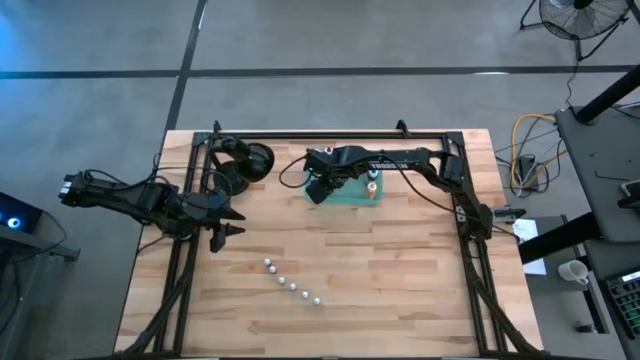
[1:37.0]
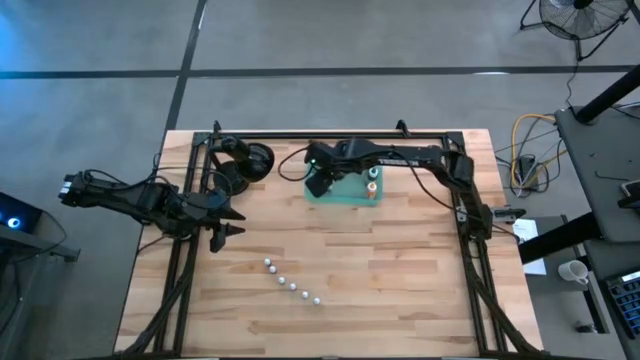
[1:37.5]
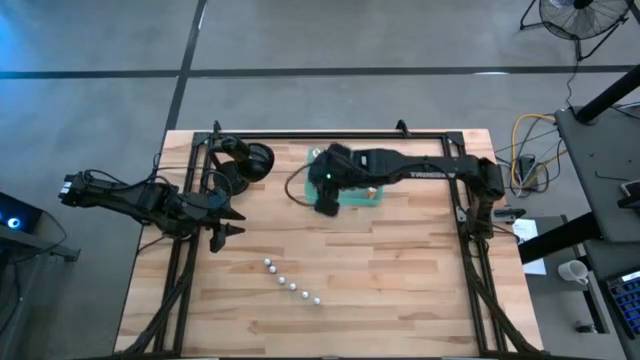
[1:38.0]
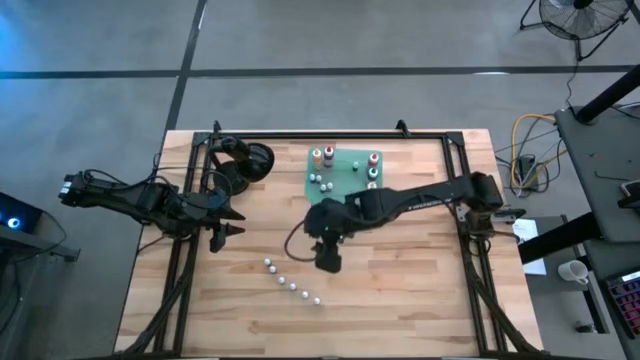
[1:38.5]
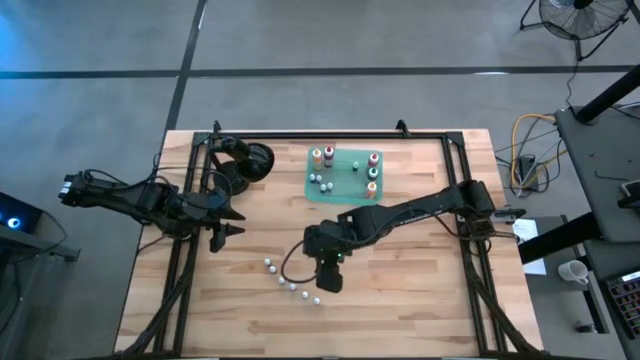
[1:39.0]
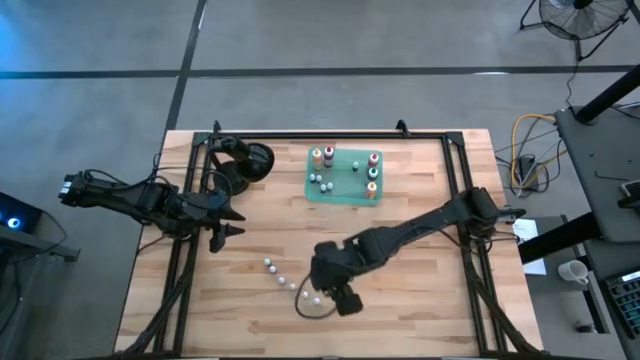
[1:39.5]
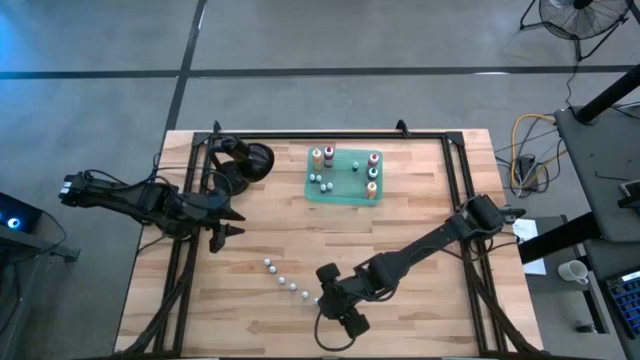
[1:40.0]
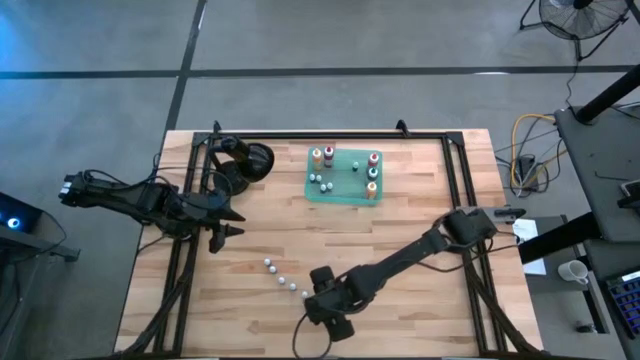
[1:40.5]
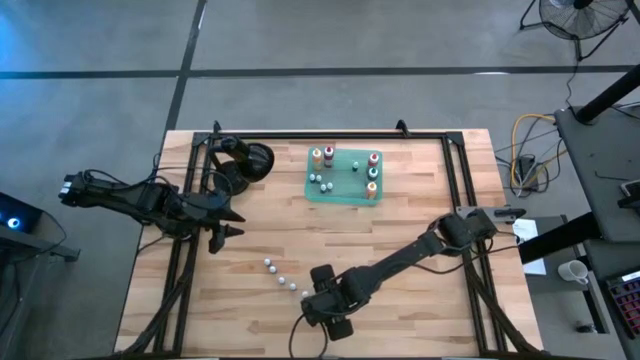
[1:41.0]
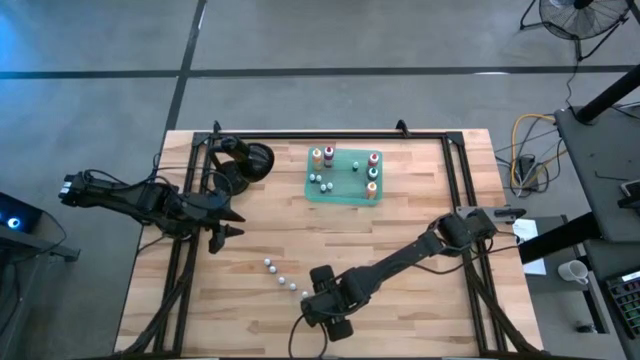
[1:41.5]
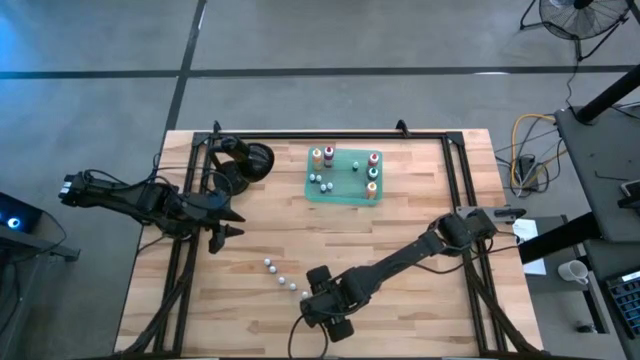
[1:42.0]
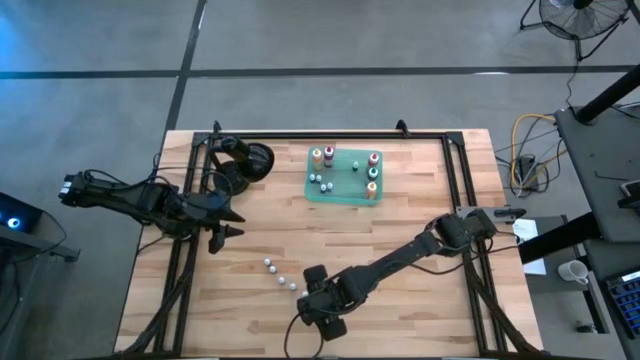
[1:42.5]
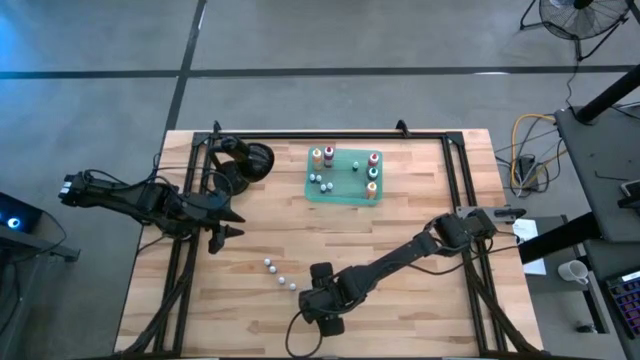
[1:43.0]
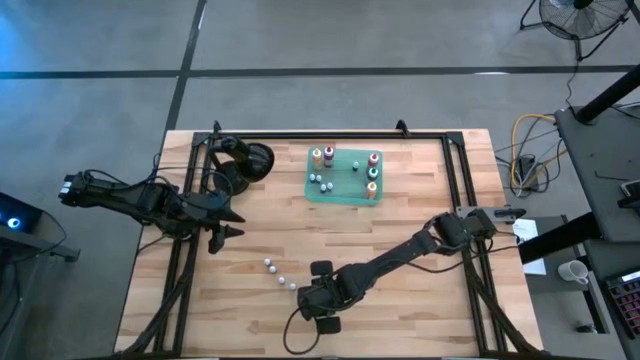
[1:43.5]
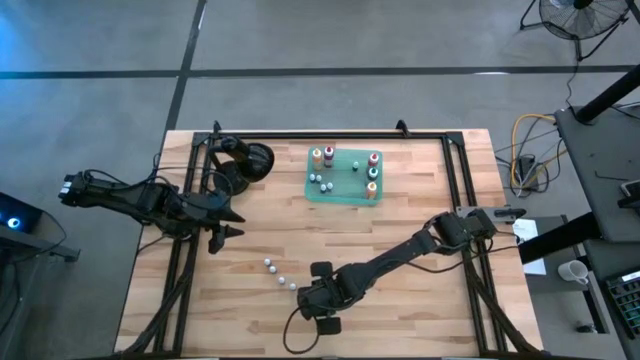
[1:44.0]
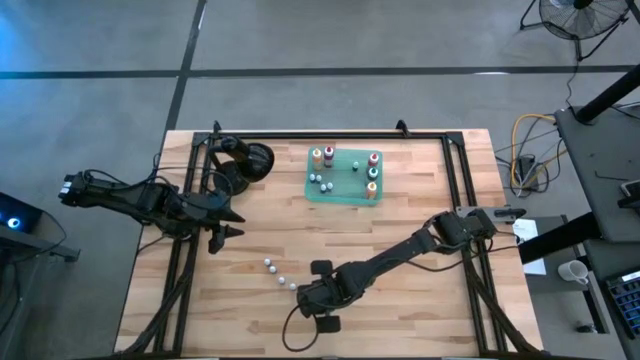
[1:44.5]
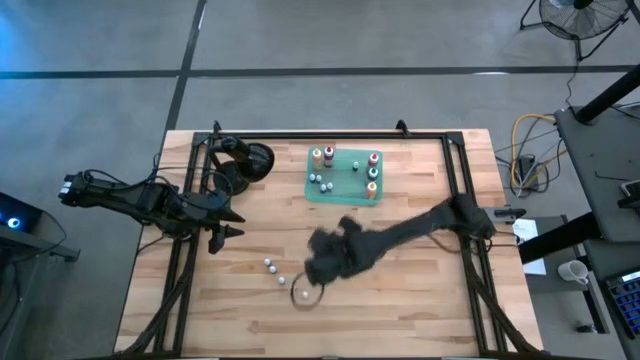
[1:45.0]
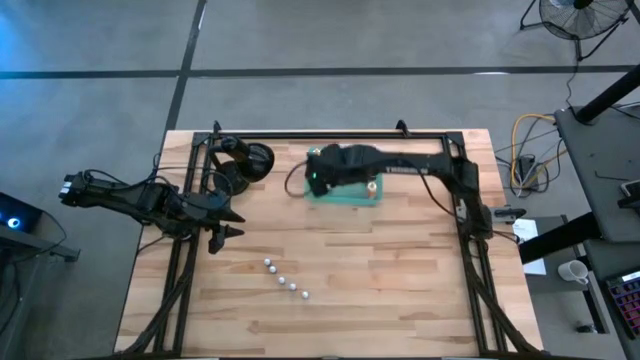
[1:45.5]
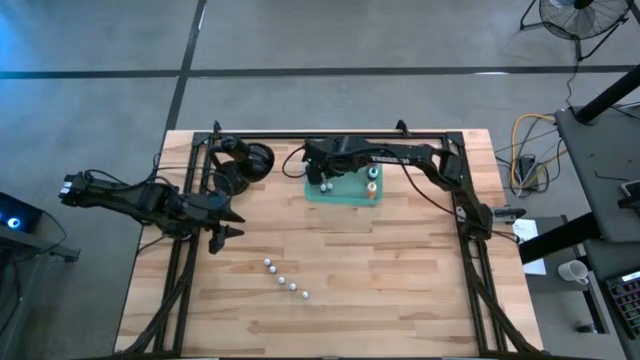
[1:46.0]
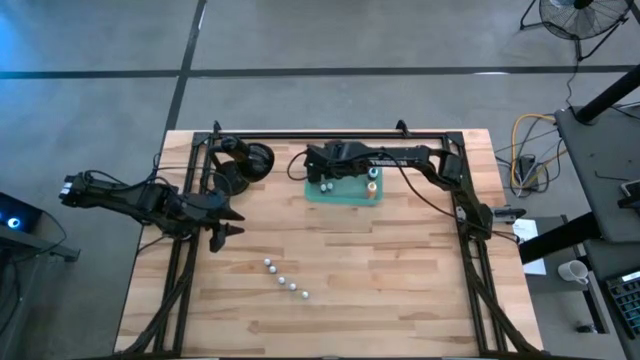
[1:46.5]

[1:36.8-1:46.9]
Task: Pick & Place food coloring
Put the small blue food coloring bottle into the green bin

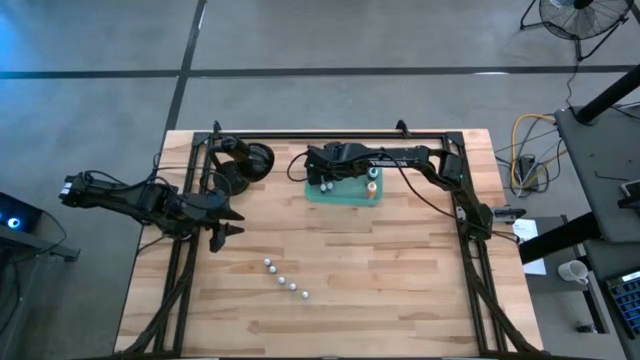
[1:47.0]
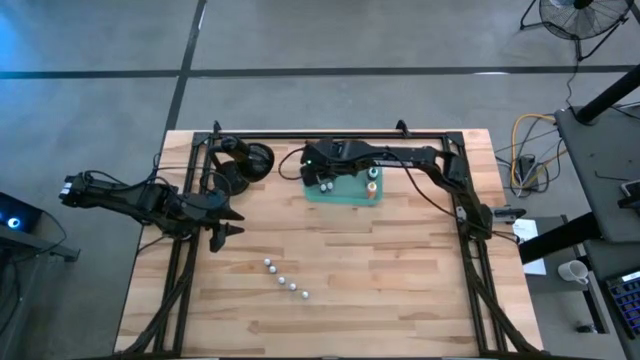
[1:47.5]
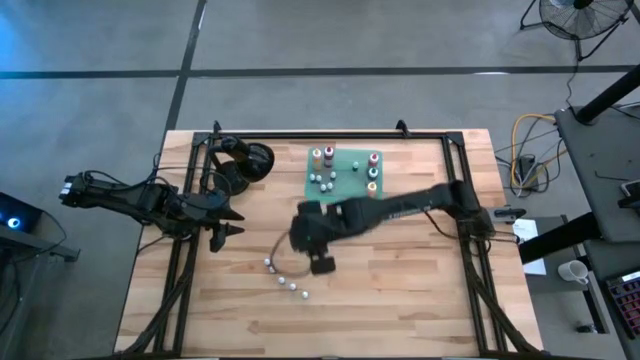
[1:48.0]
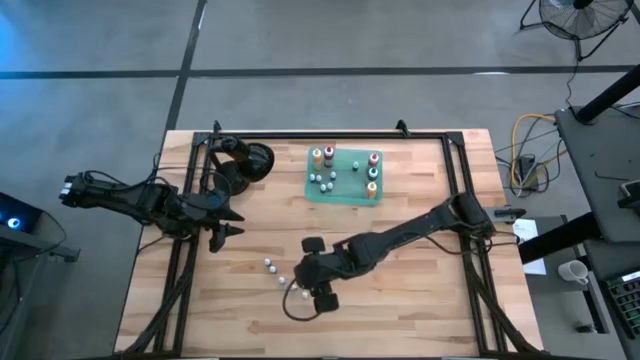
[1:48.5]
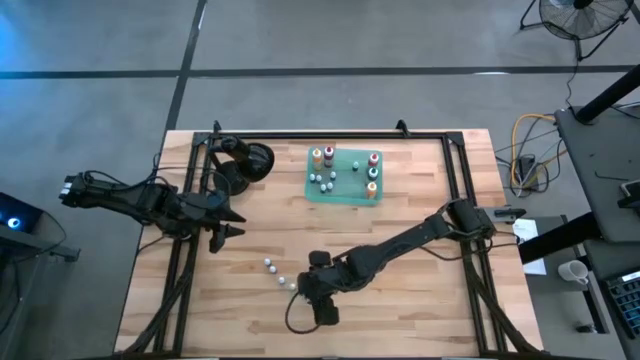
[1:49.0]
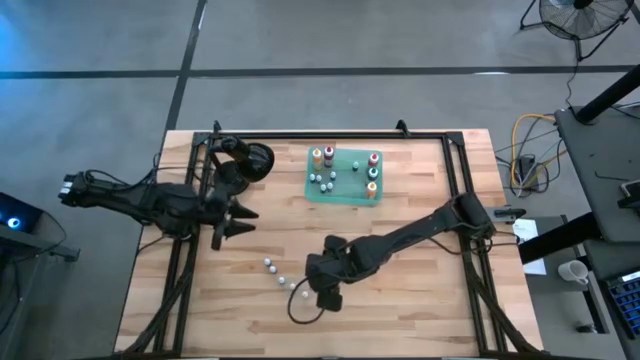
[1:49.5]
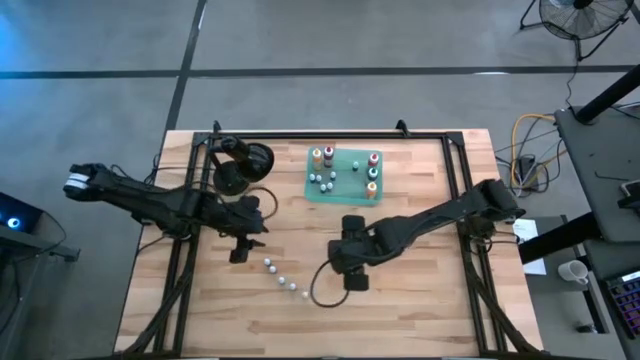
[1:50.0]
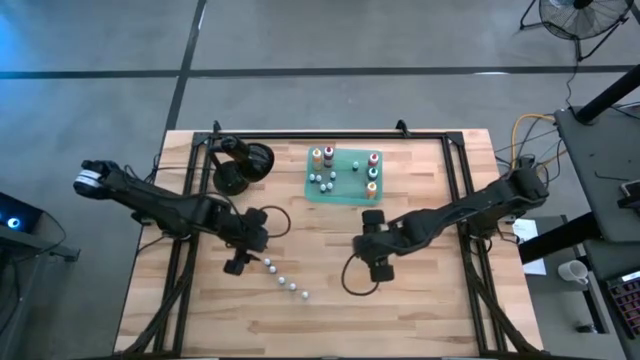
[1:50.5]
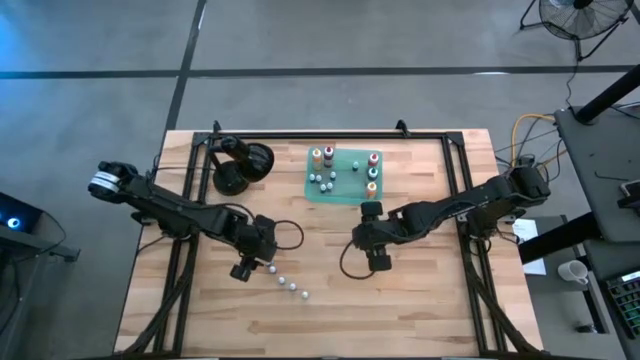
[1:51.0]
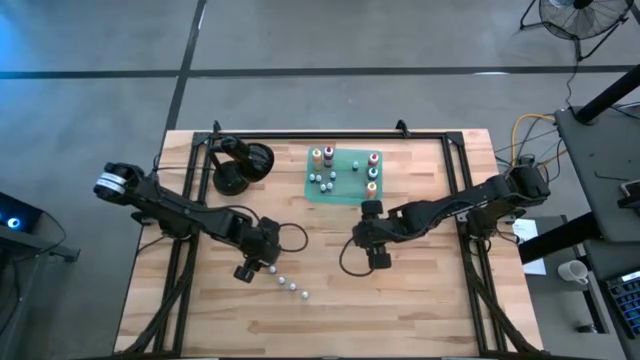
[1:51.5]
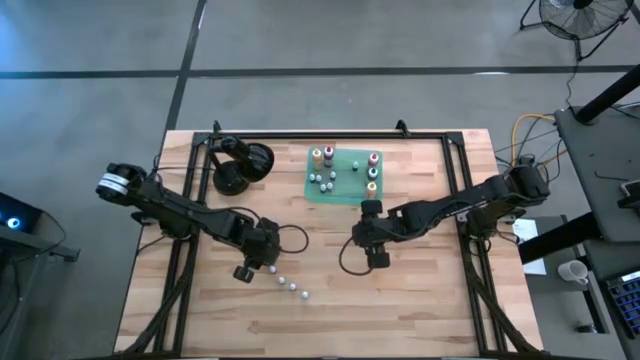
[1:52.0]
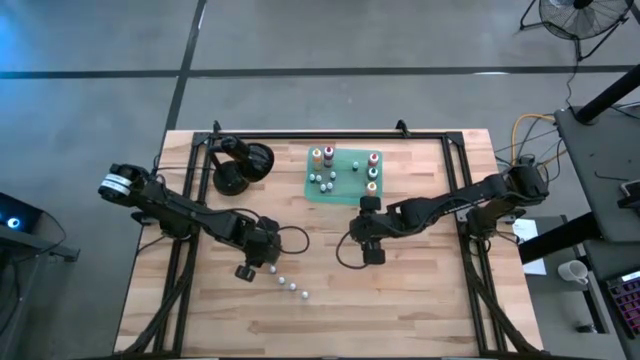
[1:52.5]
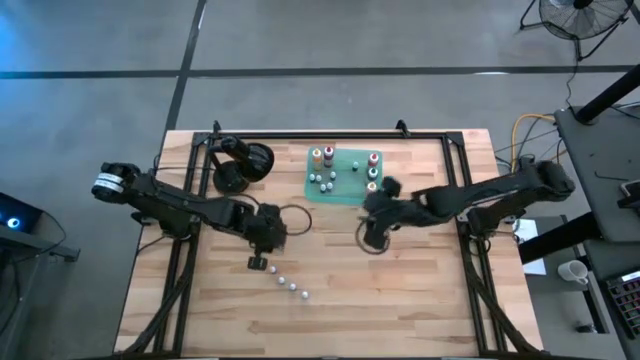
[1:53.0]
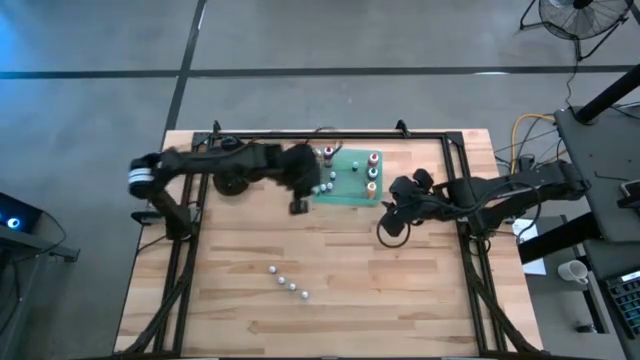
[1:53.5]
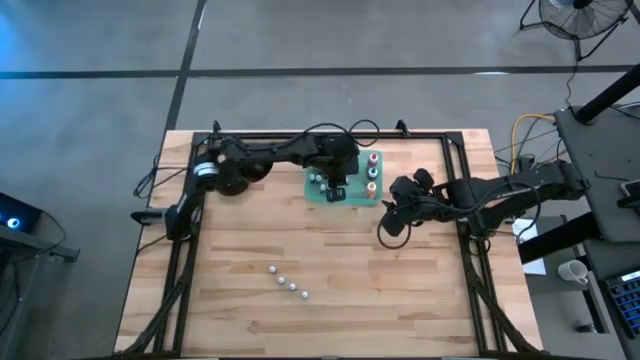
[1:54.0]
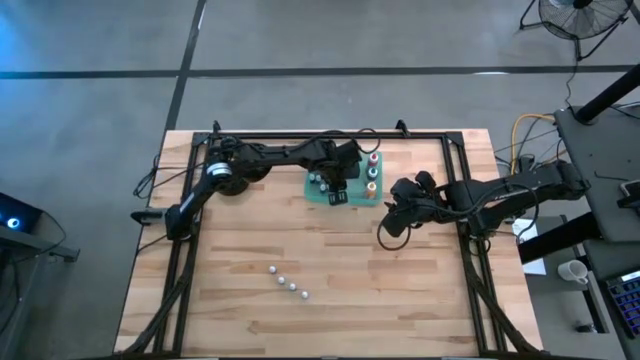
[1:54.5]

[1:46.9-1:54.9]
Put the top small red food coloring bottle into the green bin

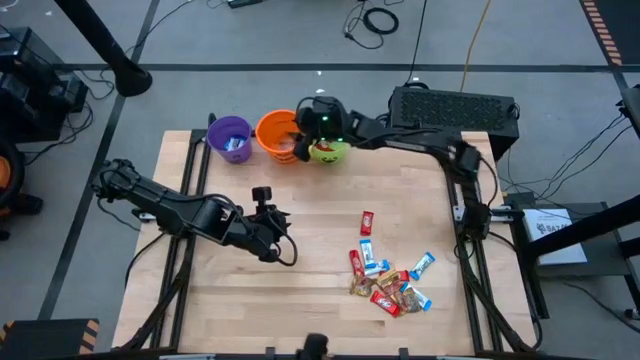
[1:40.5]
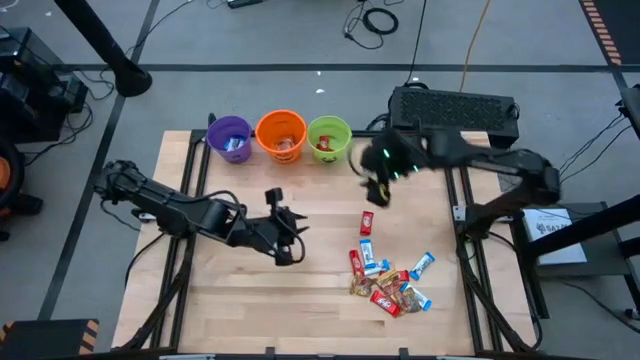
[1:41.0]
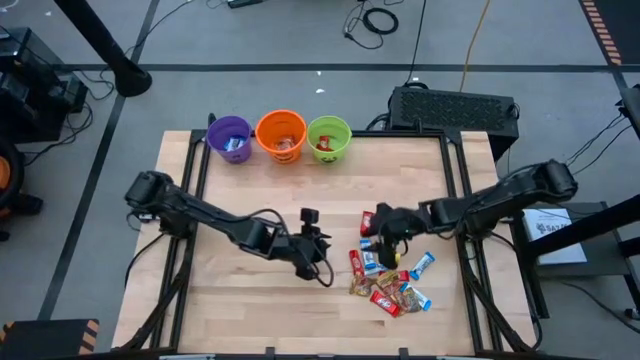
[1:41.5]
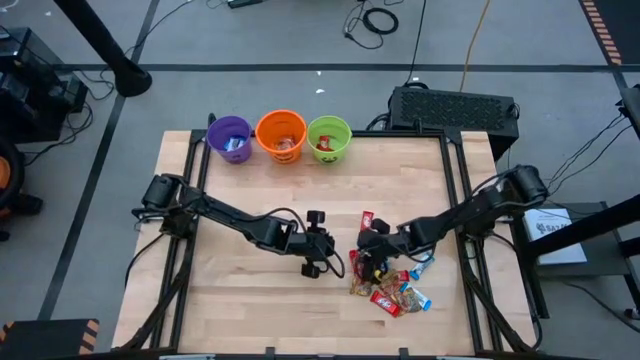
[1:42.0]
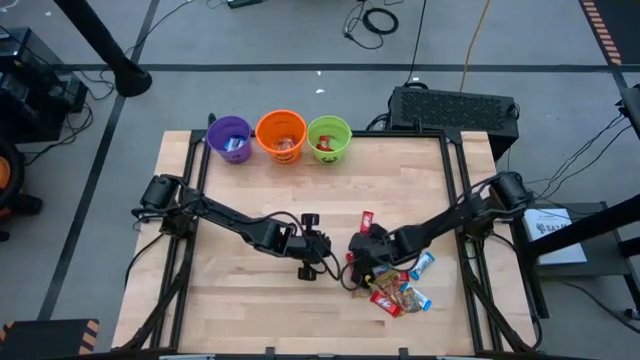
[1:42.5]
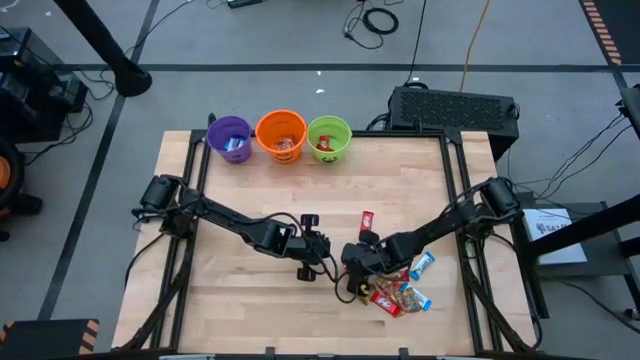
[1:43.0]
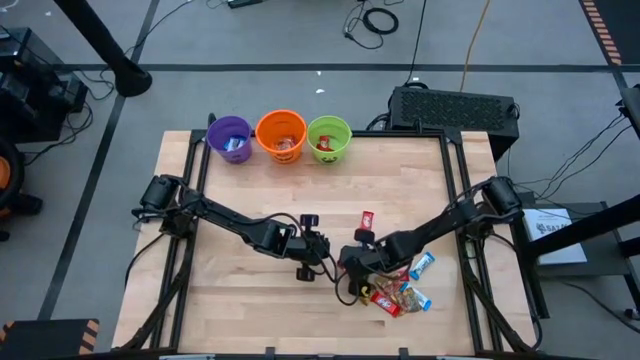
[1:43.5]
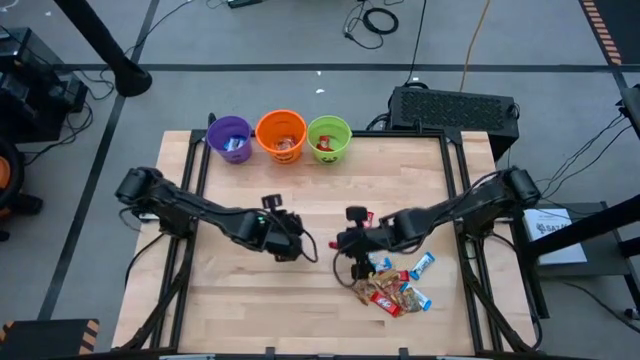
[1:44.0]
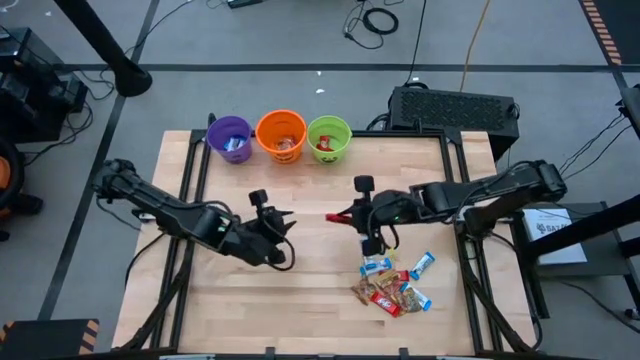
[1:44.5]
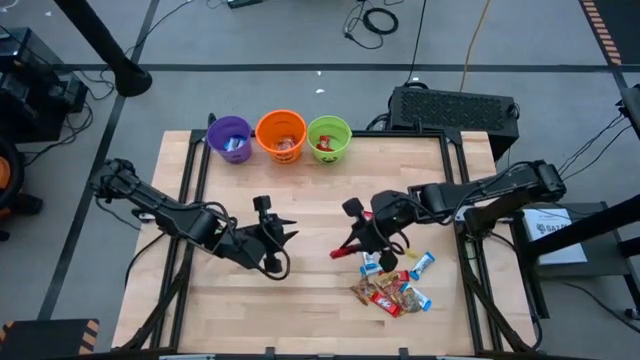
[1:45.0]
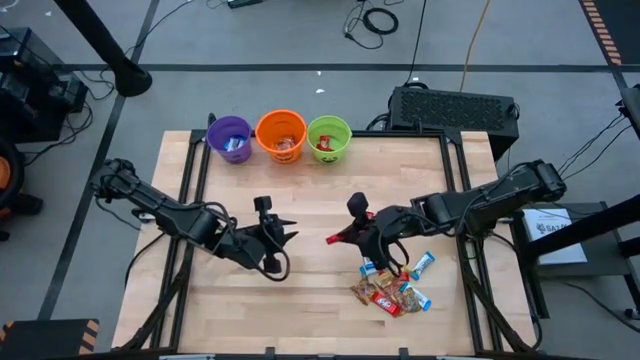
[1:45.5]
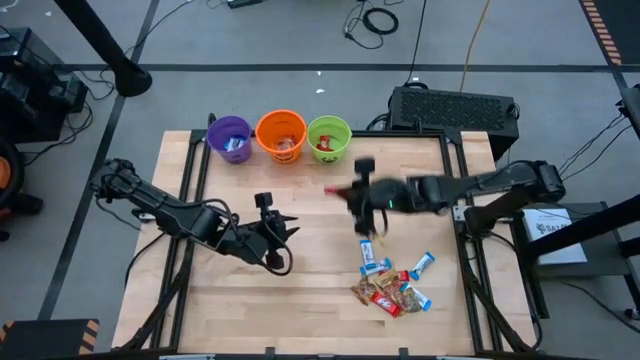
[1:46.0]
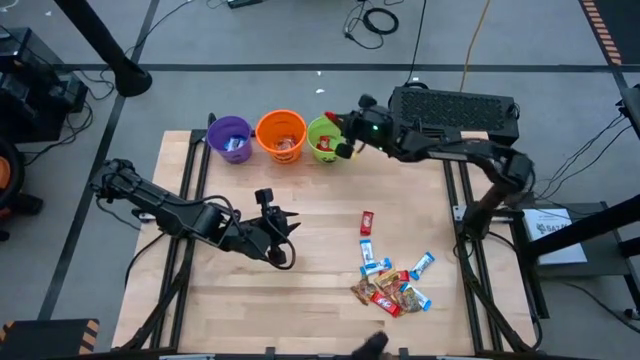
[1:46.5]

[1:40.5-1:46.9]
Task: Sort candy by brand, put in halloween buckets
Put the red chocolate bar into the green bucket
